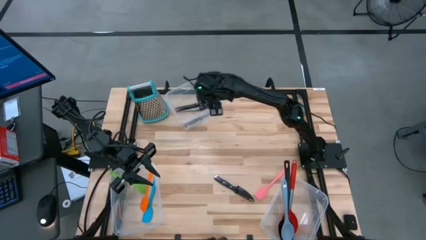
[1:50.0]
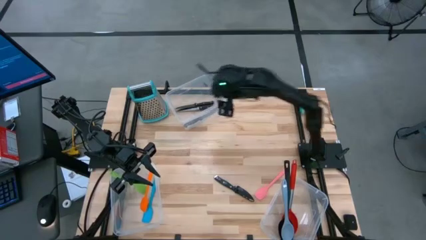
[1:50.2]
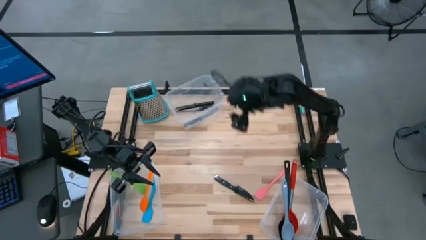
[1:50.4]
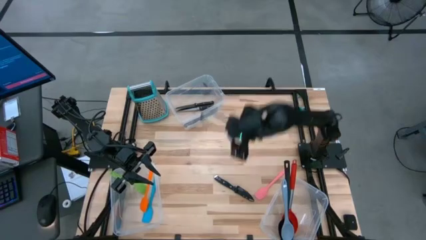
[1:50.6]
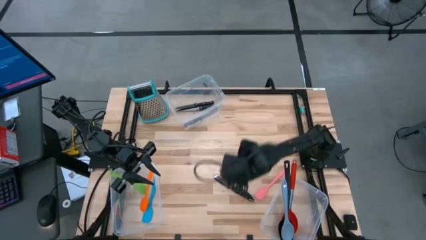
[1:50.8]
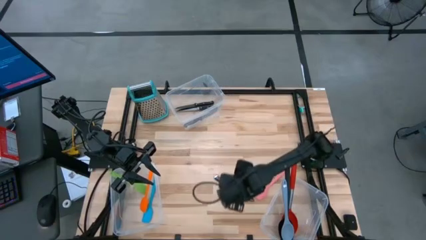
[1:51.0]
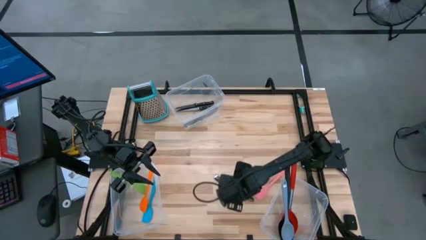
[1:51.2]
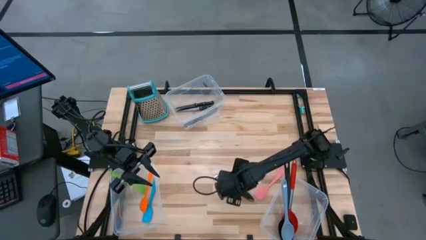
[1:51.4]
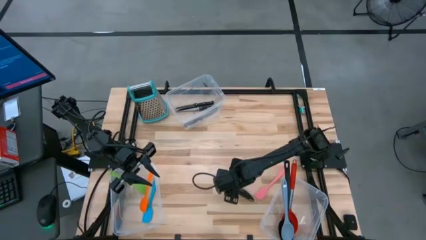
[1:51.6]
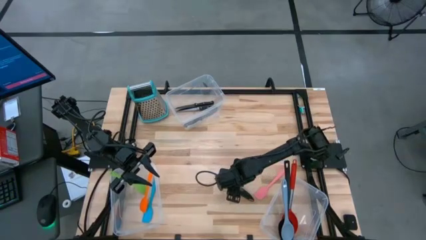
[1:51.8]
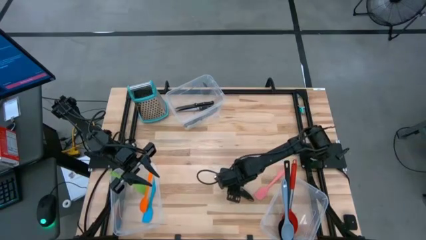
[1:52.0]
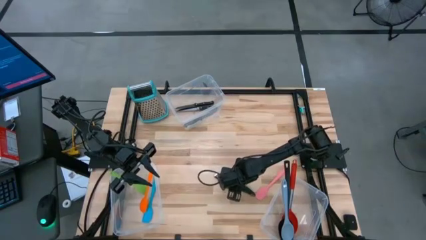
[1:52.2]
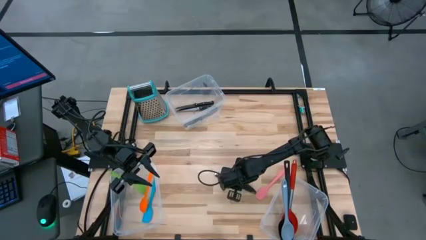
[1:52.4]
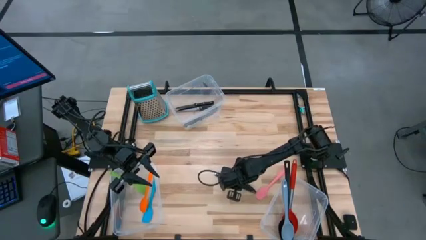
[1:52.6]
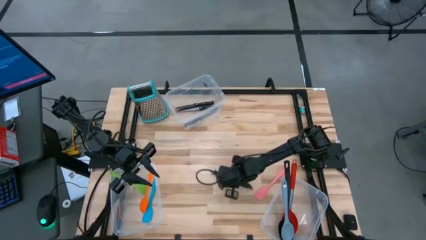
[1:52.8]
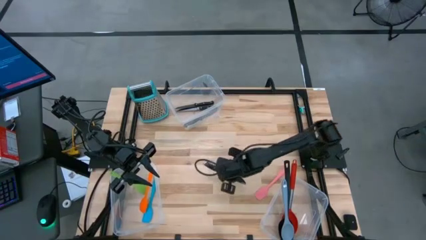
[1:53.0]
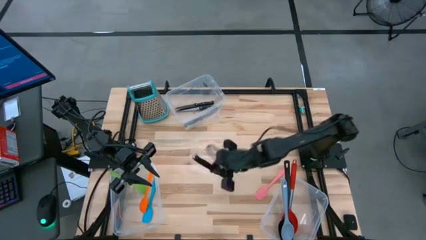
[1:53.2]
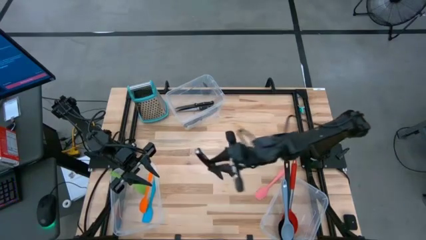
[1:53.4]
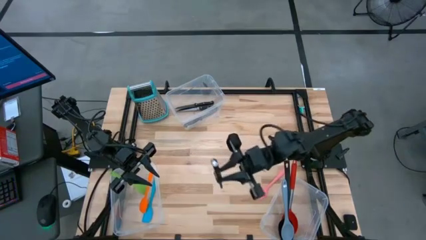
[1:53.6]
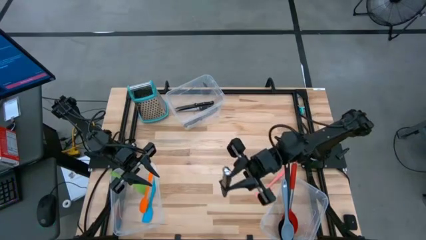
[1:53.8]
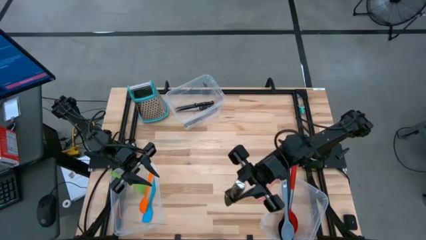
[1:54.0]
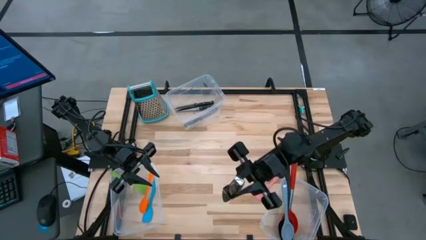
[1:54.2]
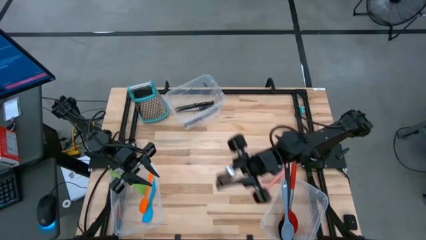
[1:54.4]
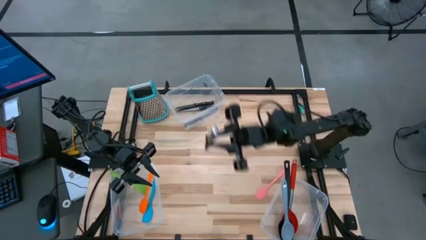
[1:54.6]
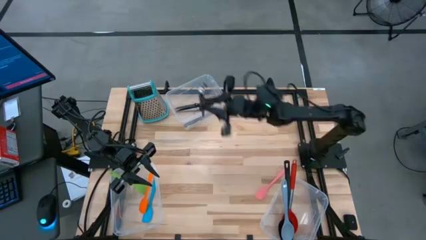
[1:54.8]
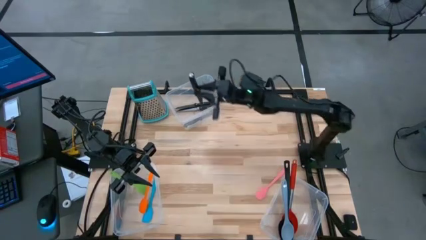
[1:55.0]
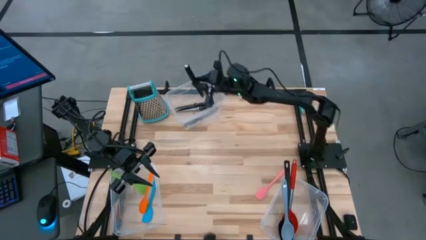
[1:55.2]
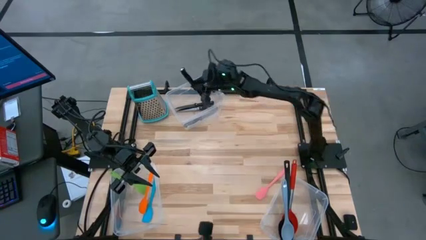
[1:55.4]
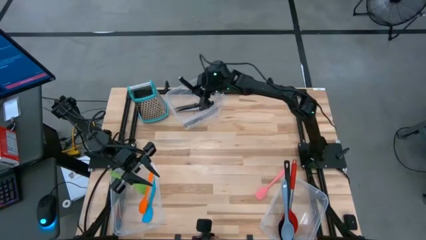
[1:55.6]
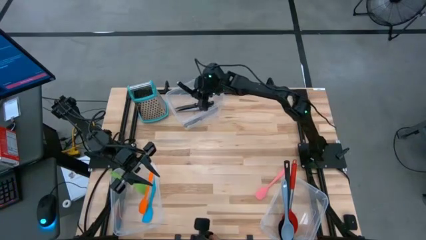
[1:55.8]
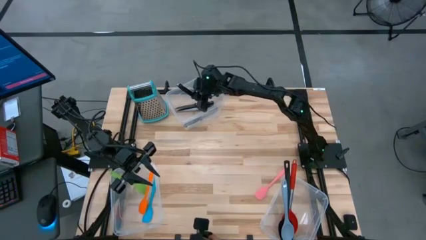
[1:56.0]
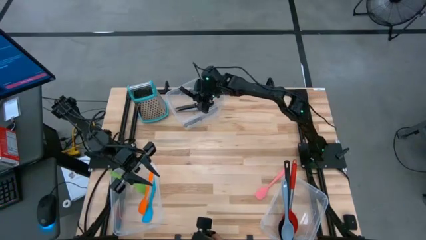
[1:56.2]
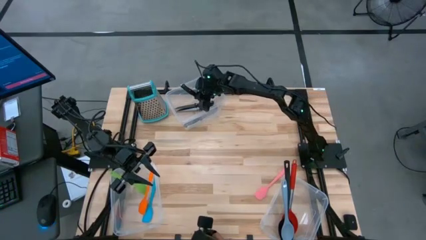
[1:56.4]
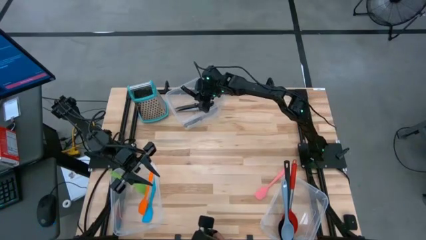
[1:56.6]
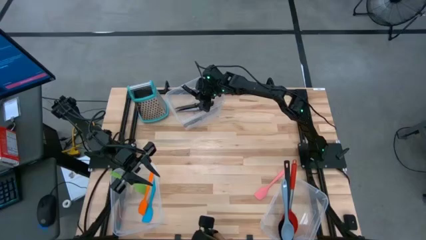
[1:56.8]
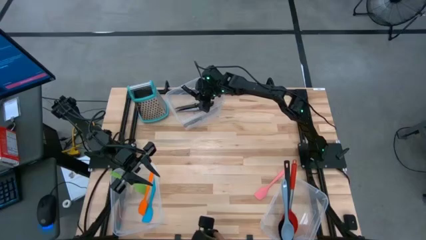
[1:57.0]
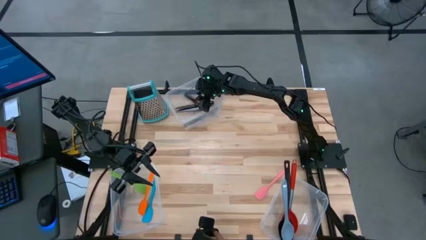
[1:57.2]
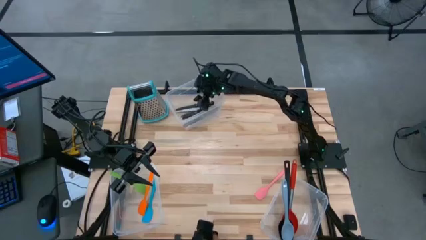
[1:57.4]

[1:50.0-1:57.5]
Task: Pick & Place Kitchen Items
Put the black knife into the top transparent bin

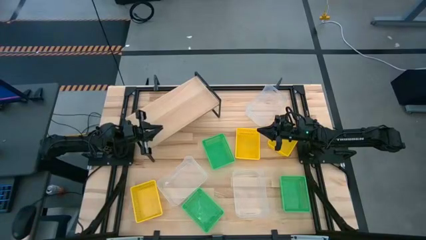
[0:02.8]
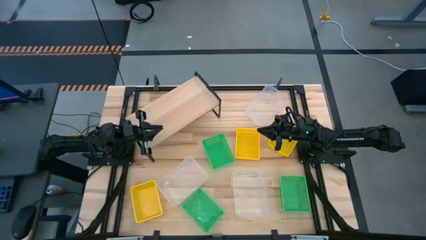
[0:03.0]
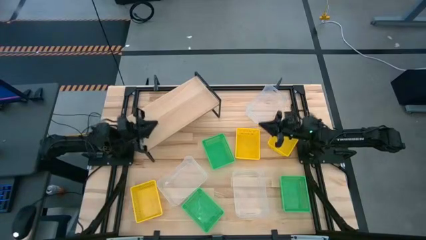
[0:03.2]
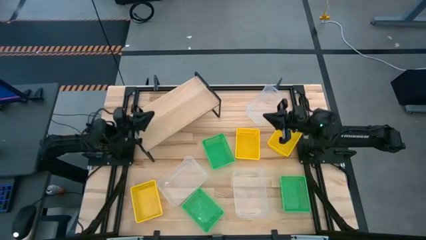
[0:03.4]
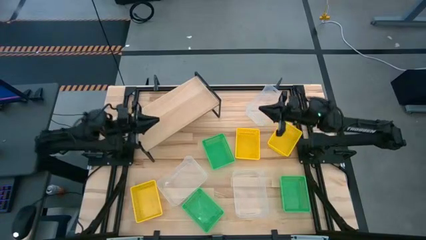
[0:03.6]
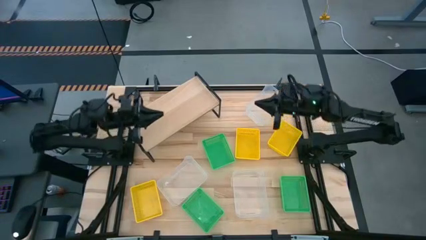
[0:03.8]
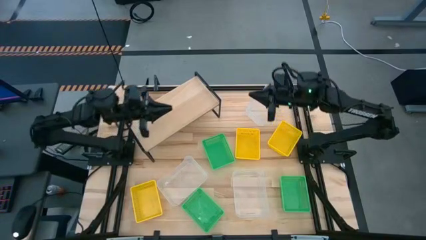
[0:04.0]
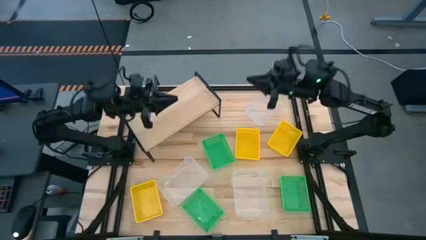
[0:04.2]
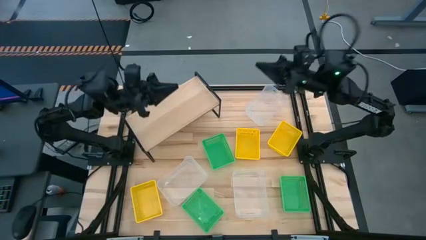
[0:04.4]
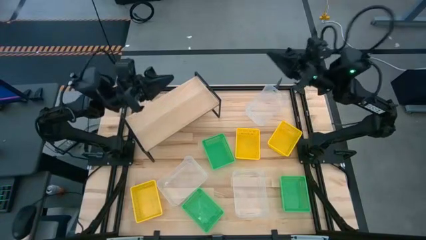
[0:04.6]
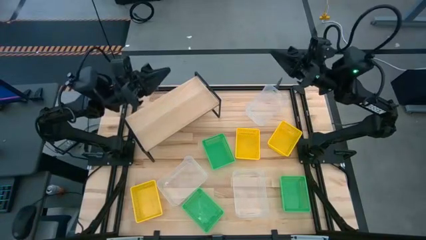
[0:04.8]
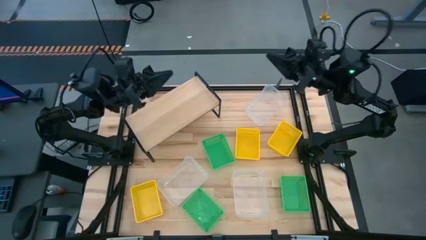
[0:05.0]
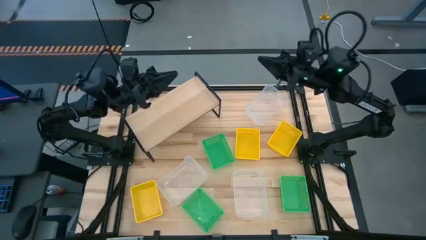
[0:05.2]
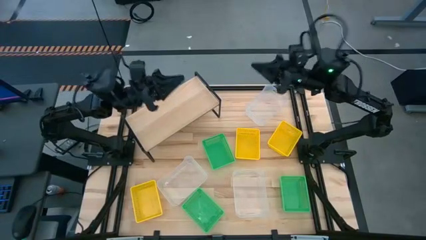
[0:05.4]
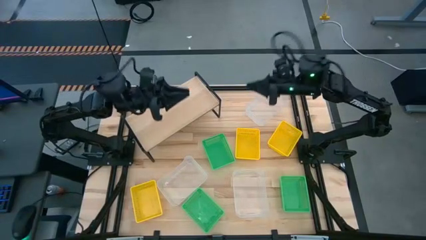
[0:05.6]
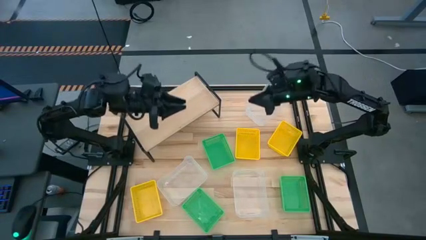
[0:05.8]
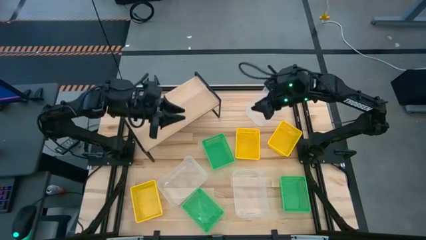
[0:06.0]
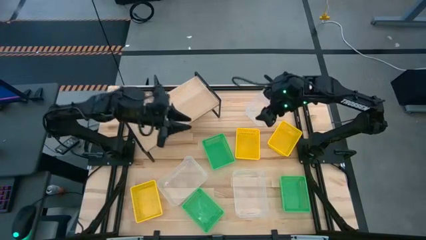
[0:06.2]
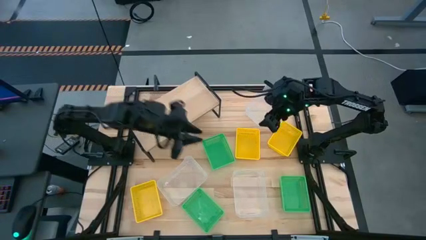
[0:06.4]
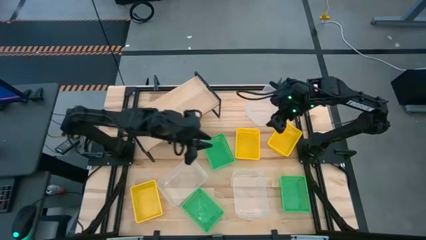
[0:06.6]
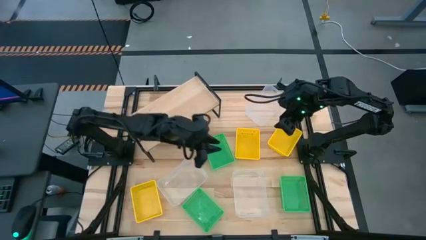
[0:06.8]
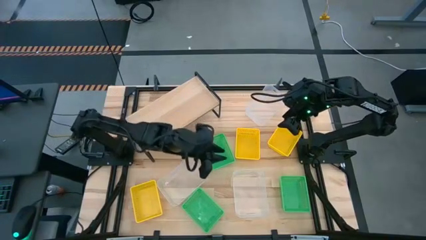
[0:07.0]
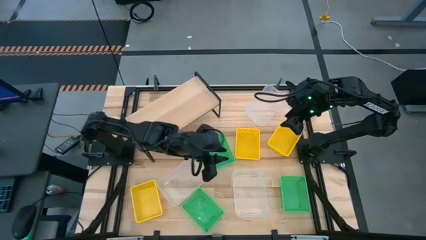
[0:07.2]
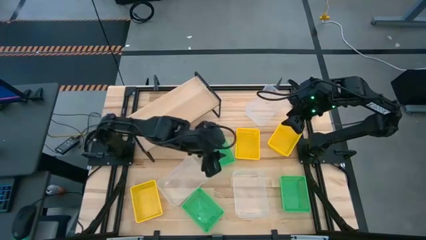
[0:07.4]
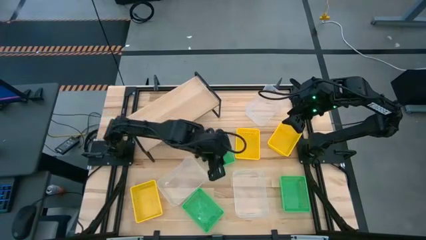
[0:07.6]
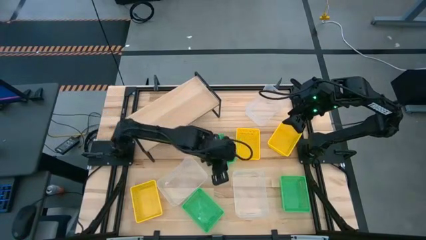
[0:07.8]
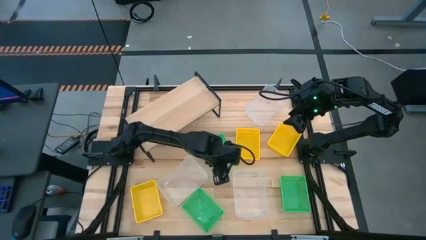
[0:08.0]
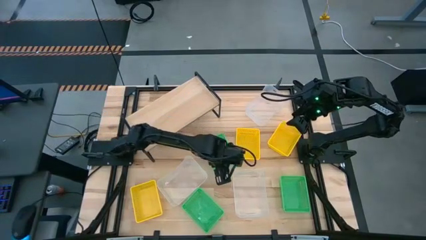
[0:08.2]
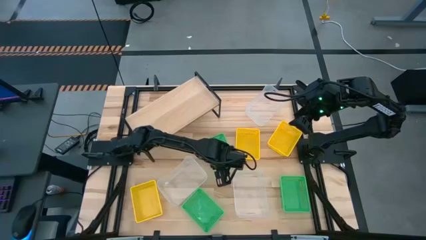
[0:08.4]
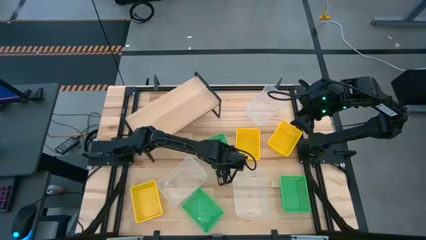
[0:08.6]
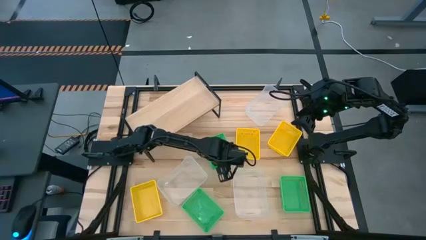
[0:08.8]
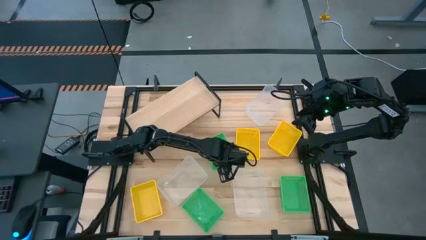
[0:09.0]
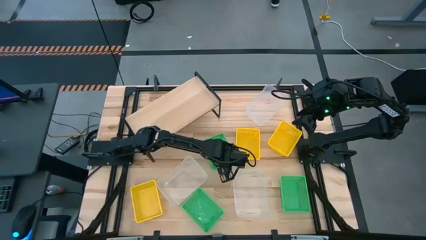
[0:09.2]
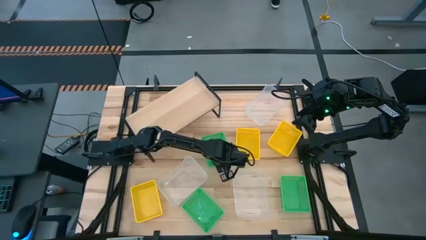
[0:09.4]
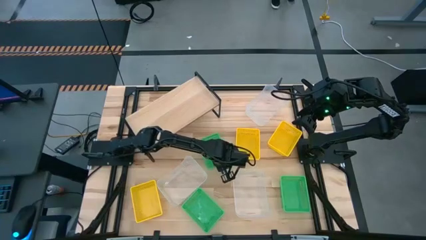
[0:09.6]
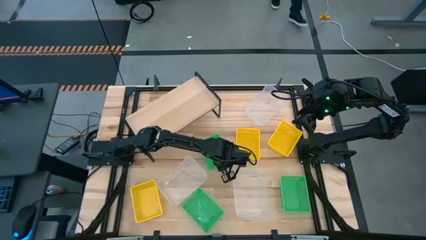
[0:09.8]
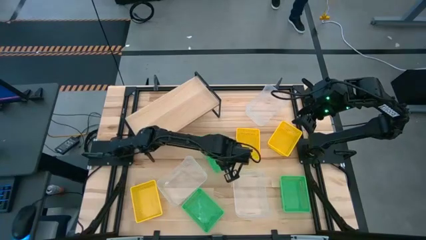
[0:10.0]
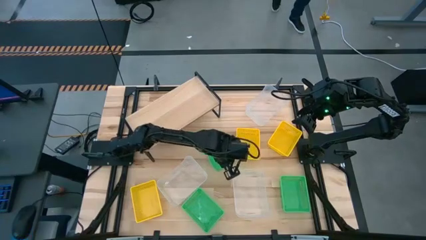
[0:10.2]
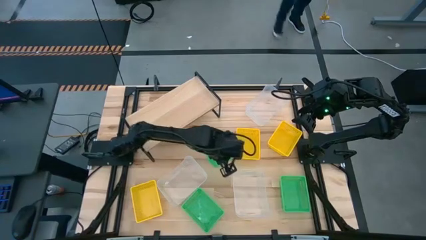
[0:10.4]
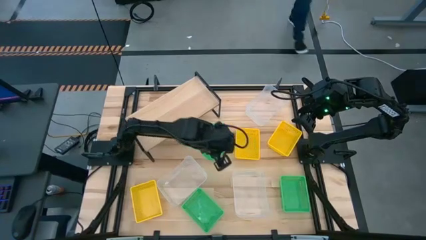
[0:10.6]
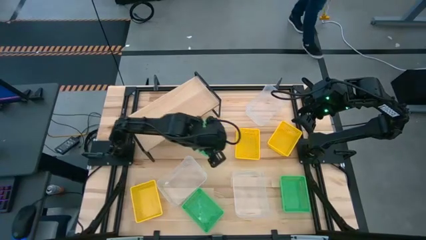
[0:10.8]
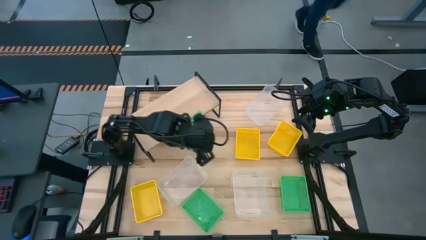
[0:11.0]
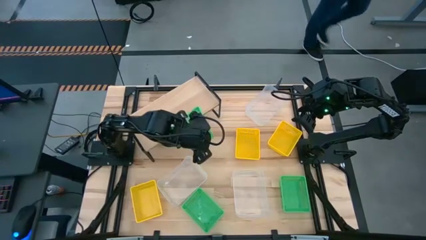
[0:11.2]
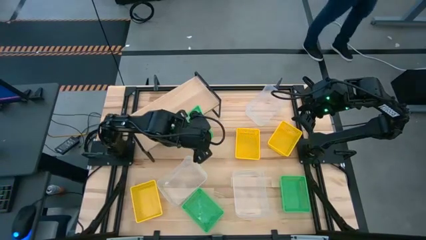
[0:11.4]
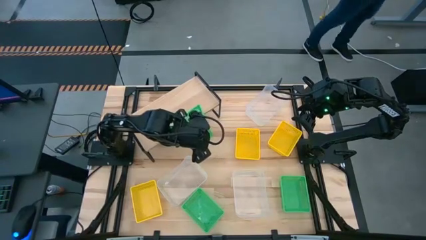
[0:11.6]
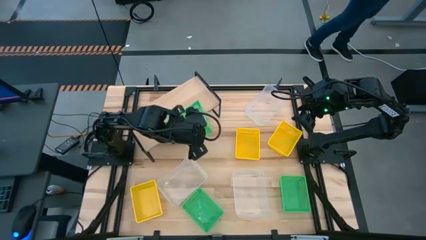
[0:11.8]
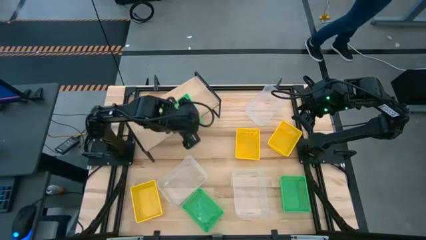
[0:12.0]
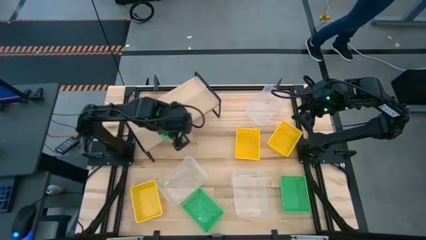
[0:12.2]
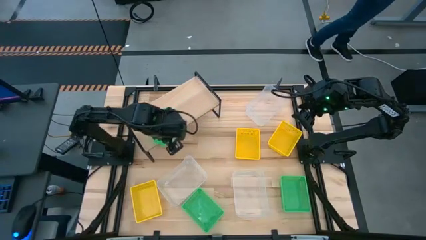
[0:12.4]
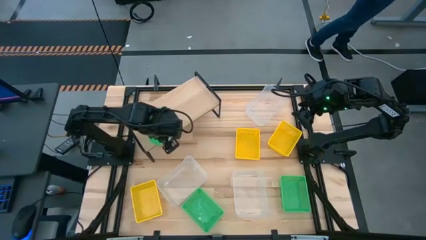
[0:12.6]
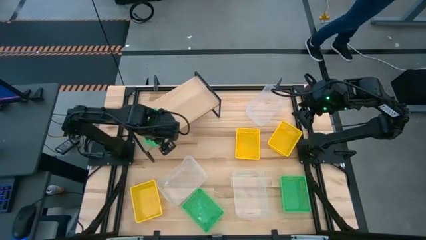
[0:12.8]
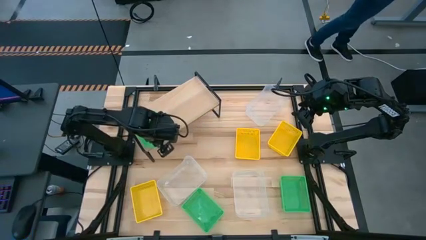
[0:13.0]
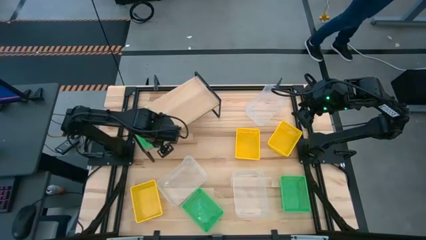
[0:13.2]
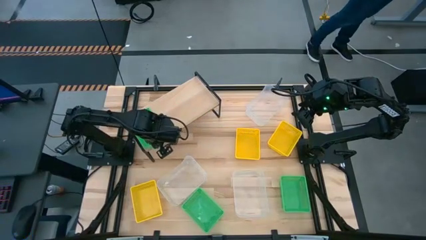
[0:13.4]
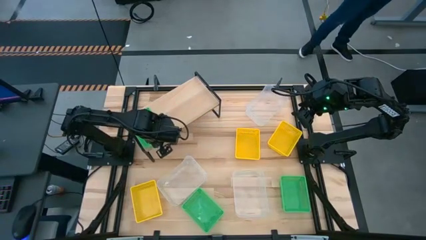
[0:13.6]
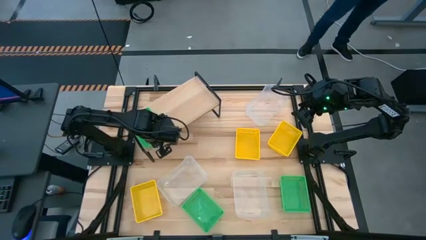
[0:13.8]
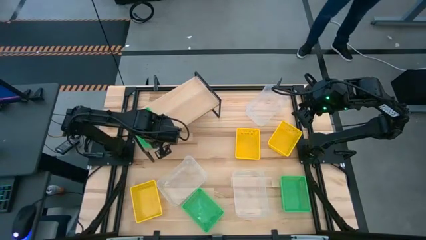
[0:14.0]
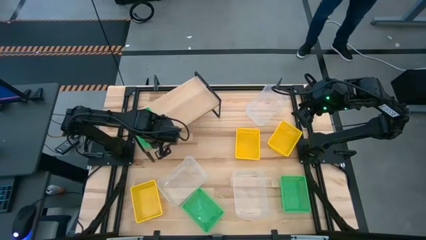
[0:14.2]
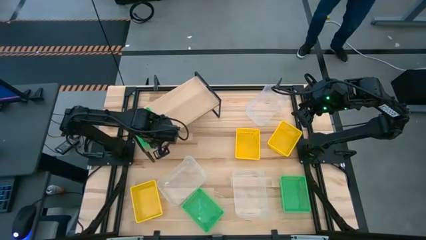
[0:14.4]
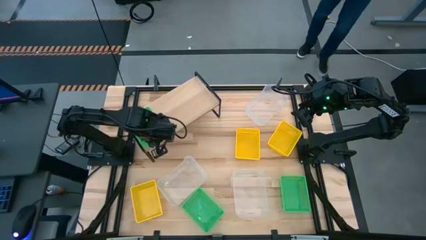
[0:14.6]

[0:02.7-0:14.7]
Task: Stack baskets on shelf by color
Put the top green bin on the shelf
